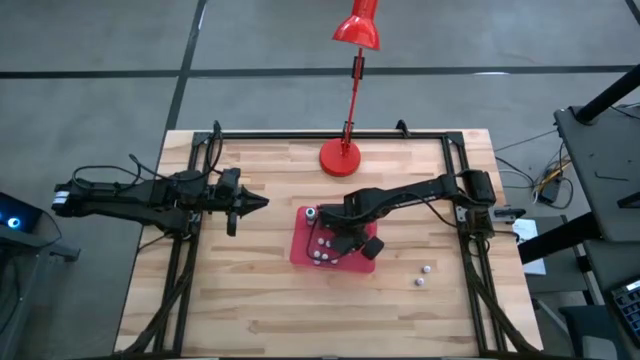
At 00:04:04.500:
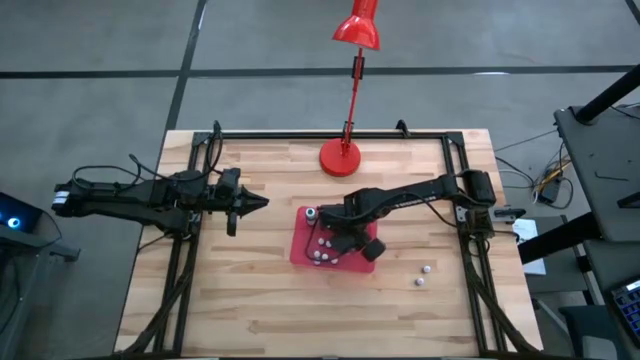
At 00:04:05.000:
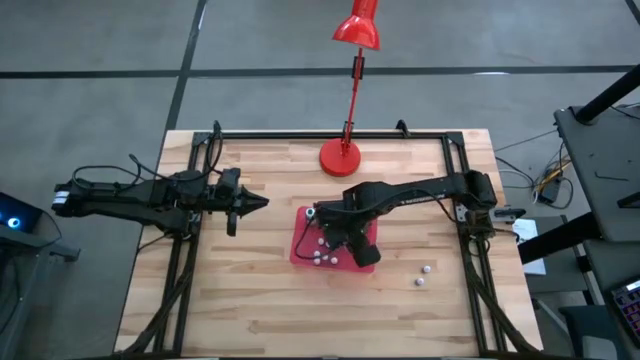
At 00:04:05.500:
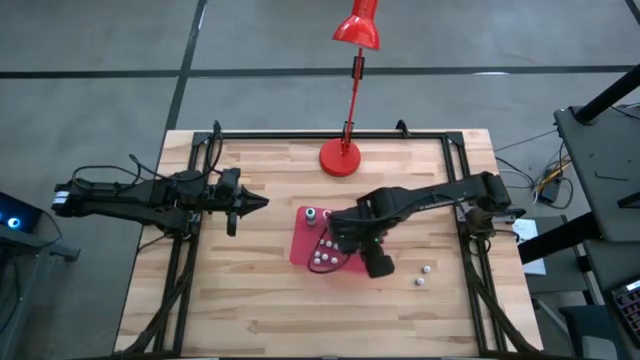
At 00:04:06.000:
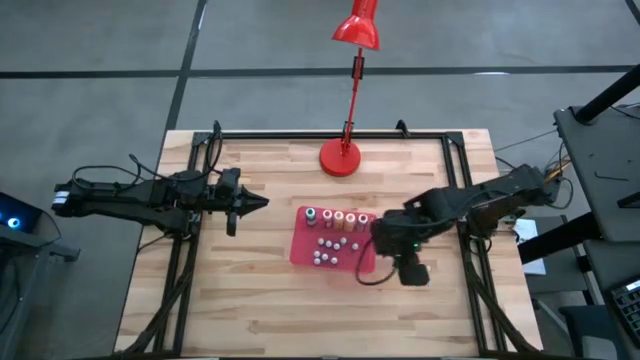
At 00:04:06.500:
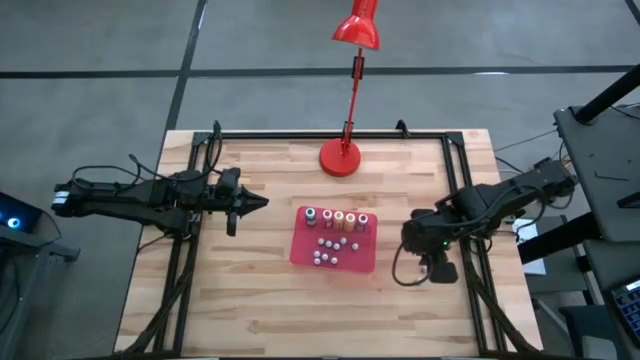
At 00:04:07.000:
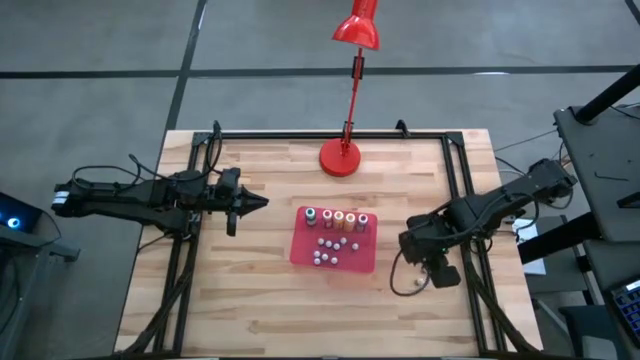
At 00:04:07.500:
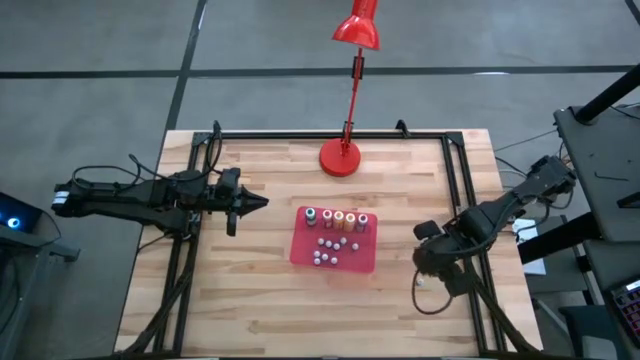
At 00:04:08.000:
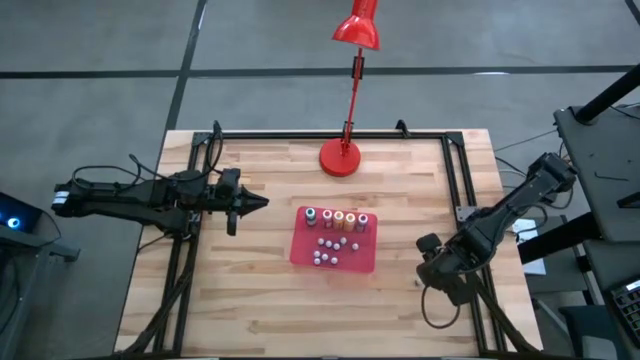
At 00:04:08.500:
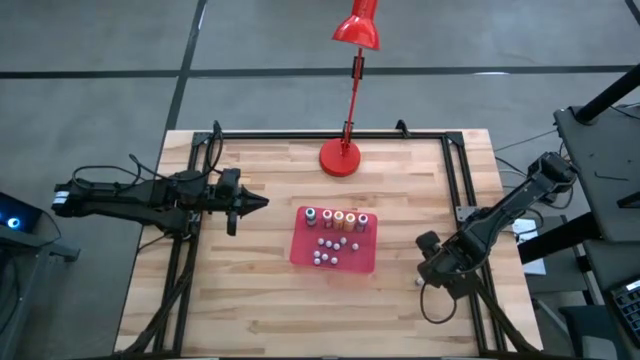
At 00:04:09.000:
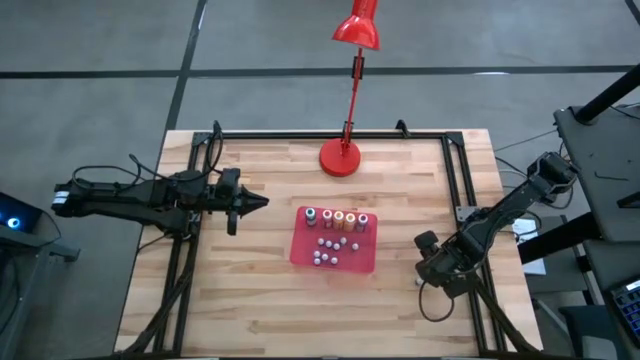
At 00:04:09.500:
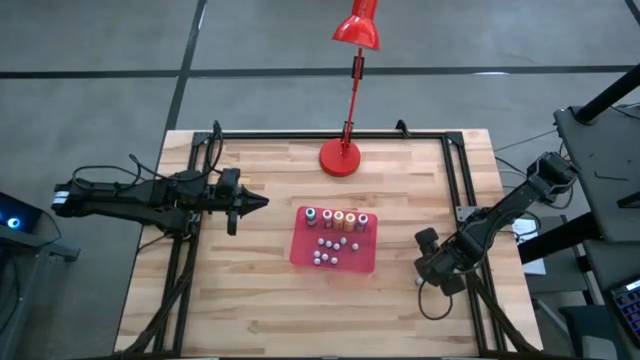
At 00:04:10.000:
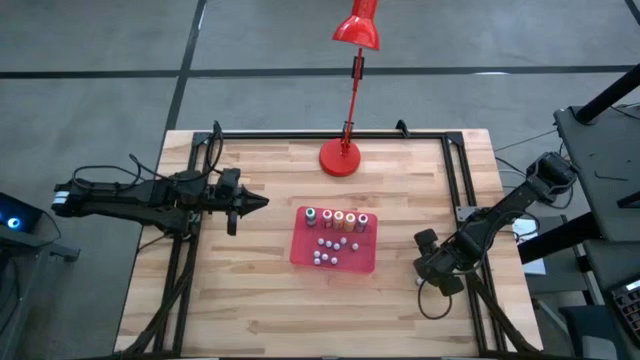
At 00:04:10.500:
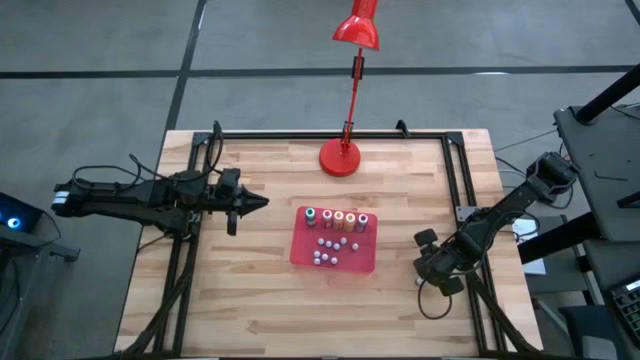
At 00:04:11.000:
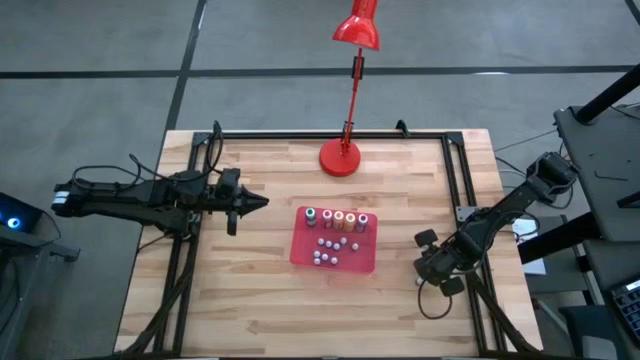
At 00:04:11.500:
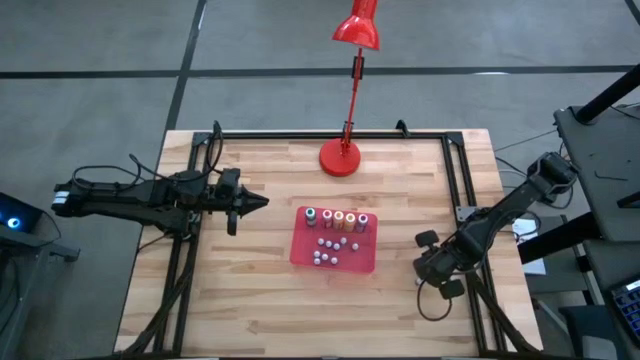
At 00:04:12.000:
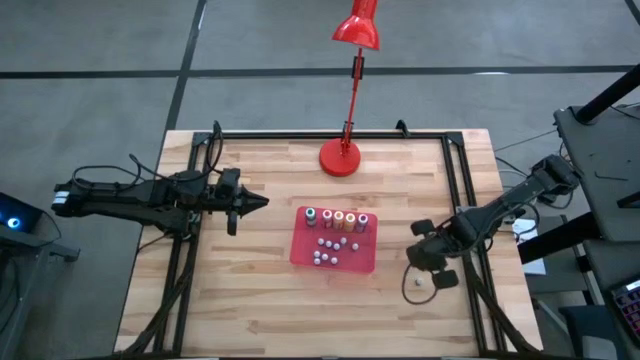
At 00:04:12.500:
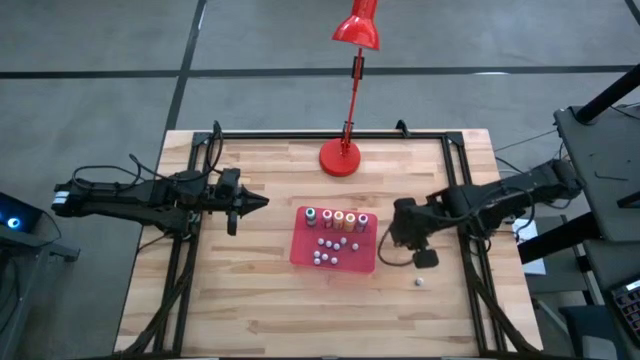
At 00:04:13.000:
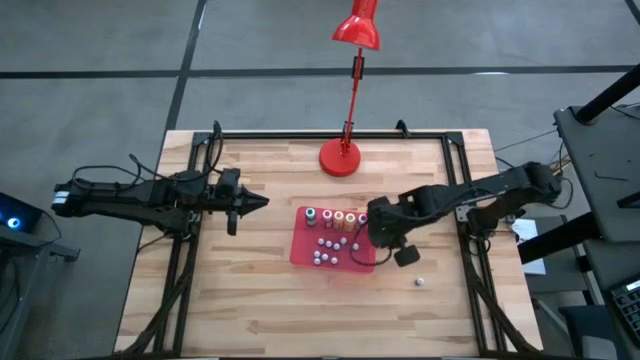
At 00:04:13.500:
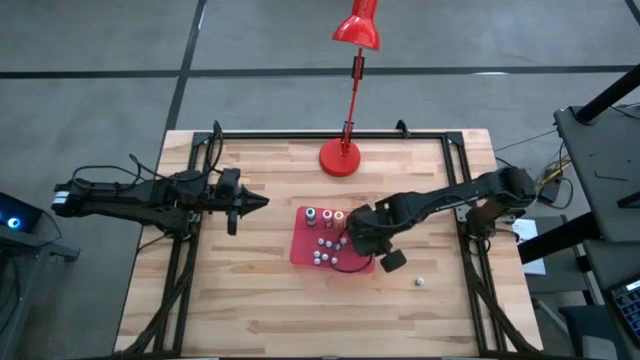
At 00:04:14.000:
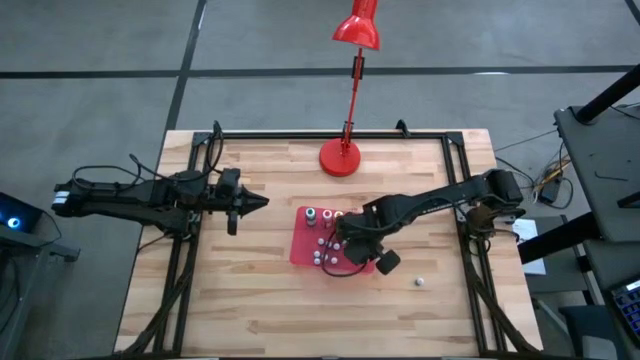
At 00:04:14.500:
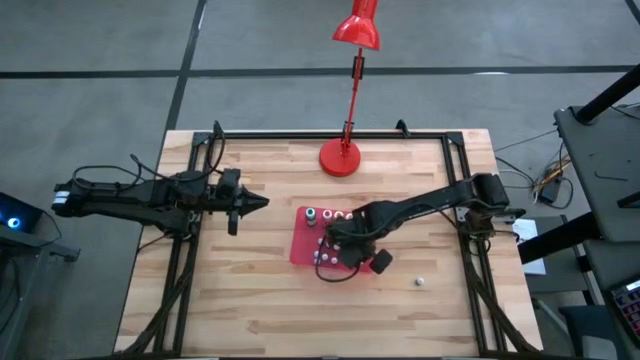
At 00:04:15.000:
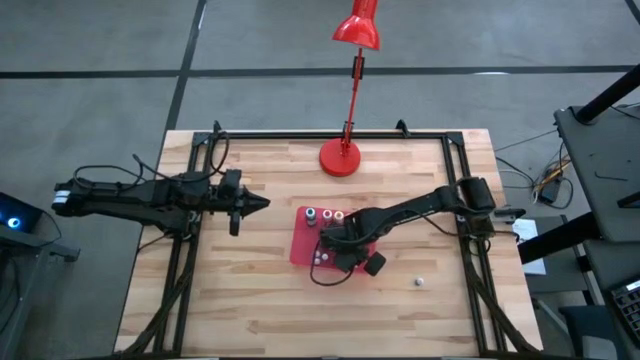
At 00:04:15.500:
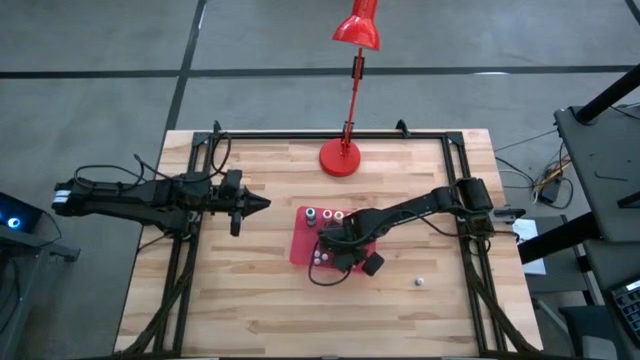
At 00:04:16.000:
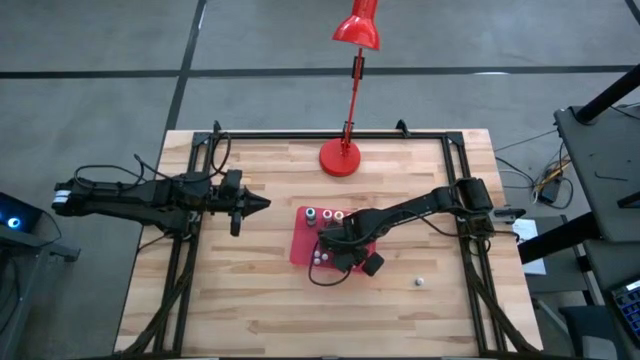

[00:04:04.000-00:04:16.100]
Task: Pick & Place food coloring
Put the small red food coloring bottle into the red bin

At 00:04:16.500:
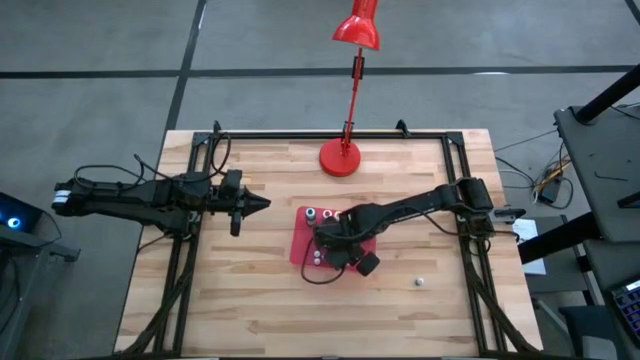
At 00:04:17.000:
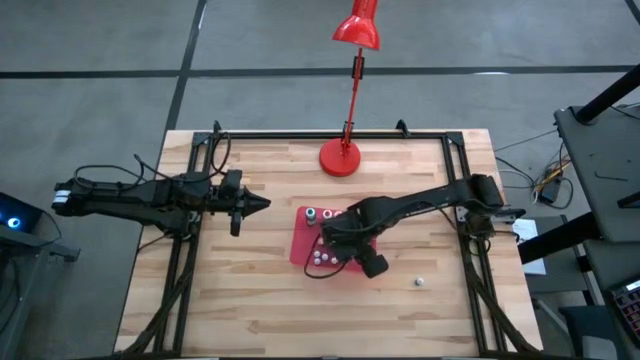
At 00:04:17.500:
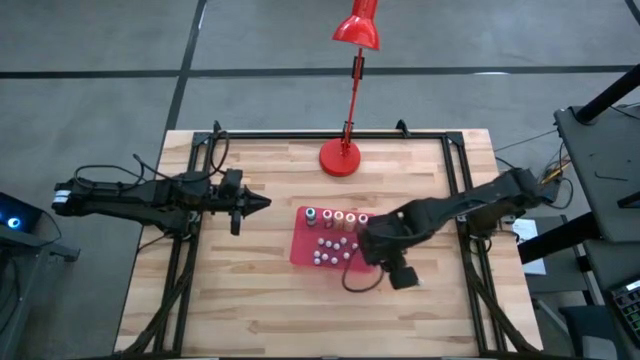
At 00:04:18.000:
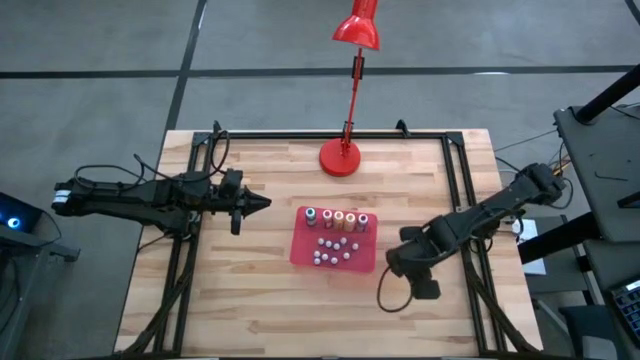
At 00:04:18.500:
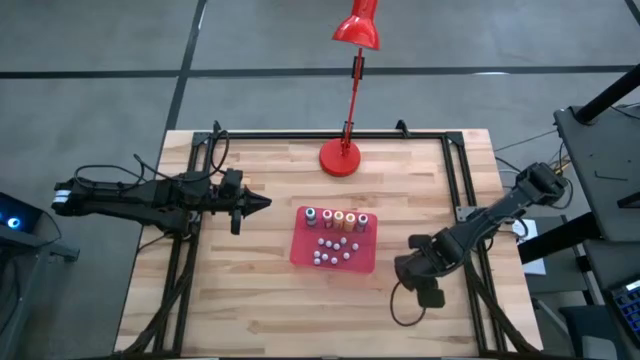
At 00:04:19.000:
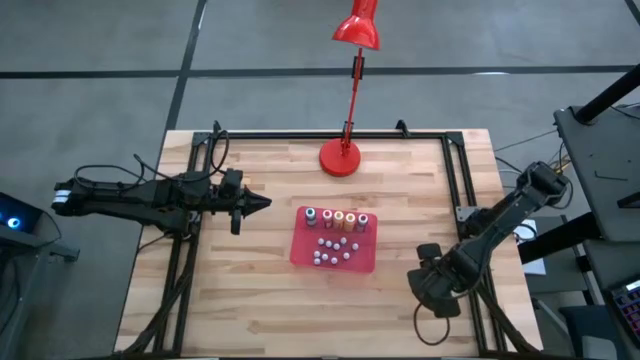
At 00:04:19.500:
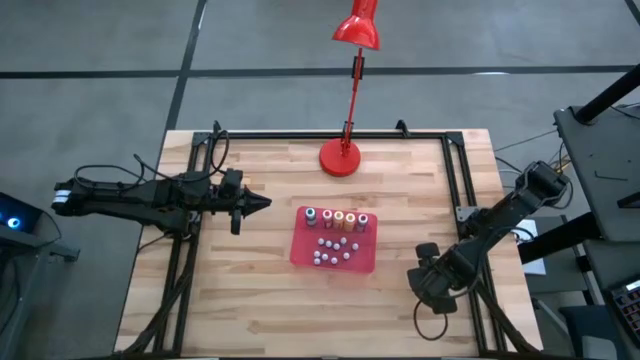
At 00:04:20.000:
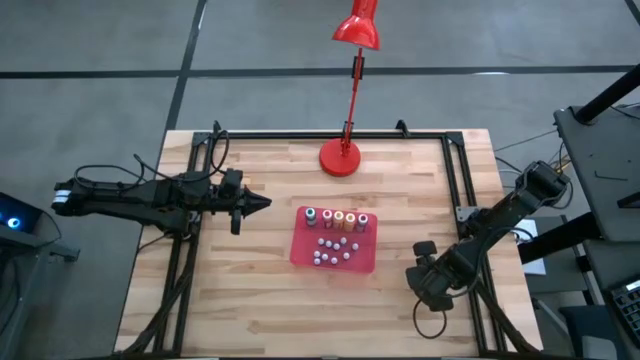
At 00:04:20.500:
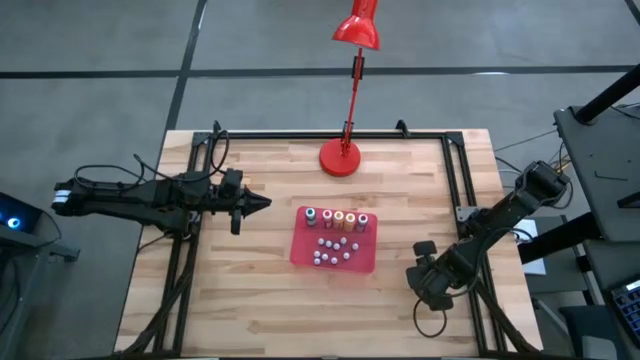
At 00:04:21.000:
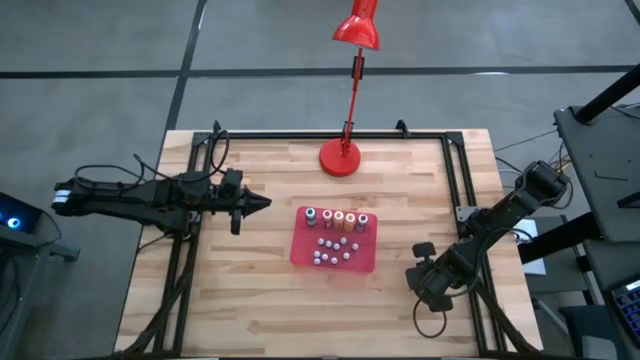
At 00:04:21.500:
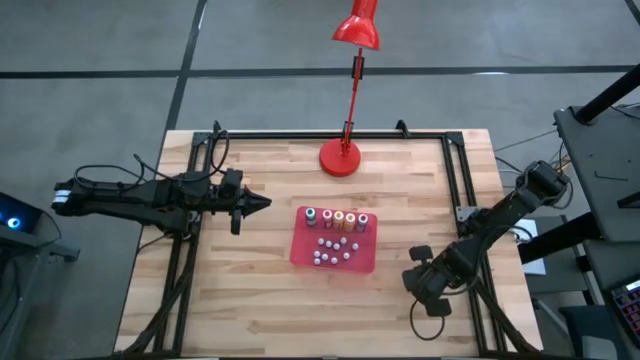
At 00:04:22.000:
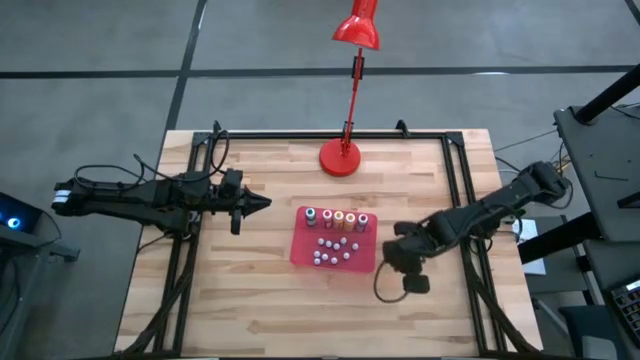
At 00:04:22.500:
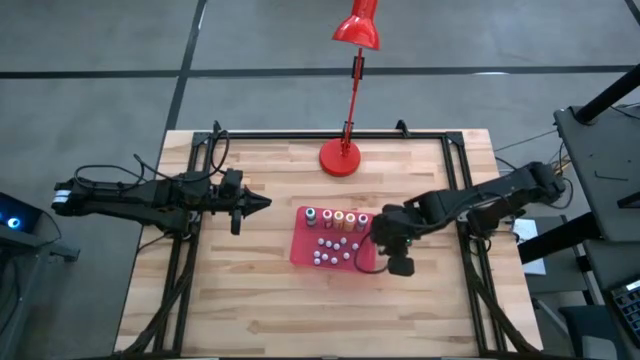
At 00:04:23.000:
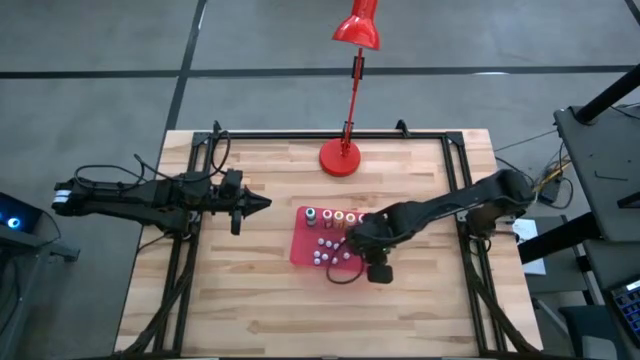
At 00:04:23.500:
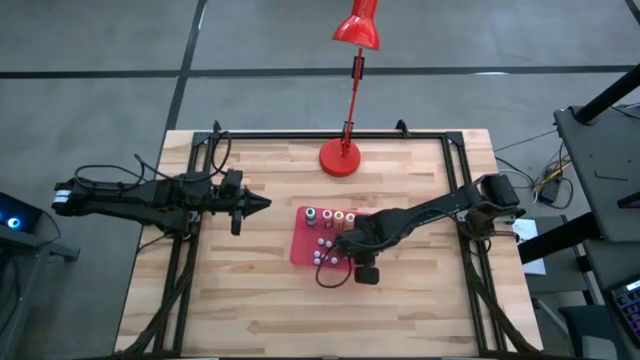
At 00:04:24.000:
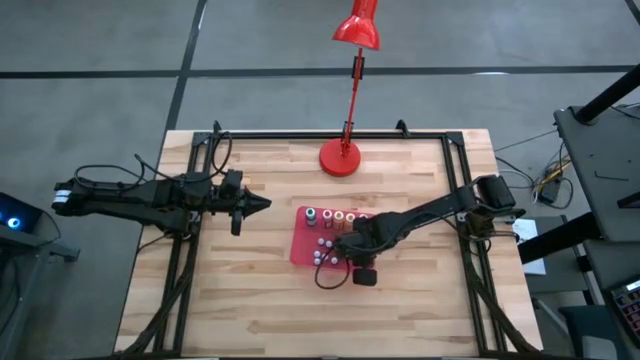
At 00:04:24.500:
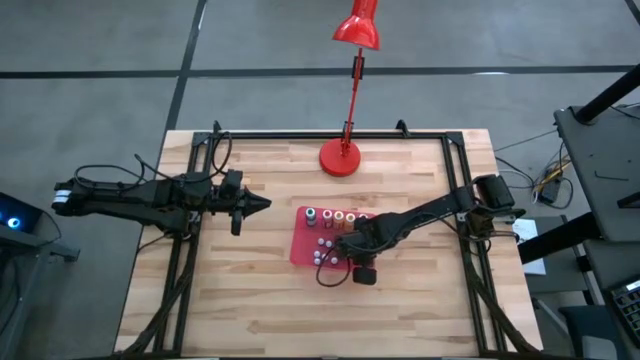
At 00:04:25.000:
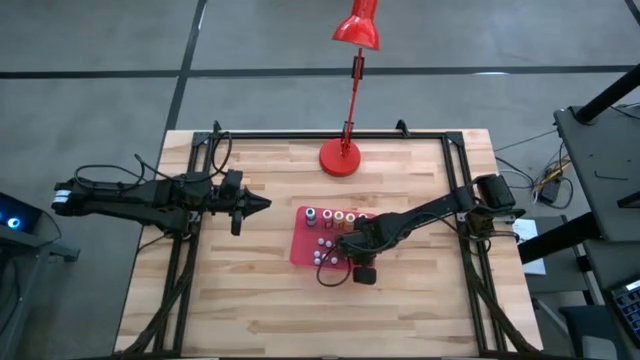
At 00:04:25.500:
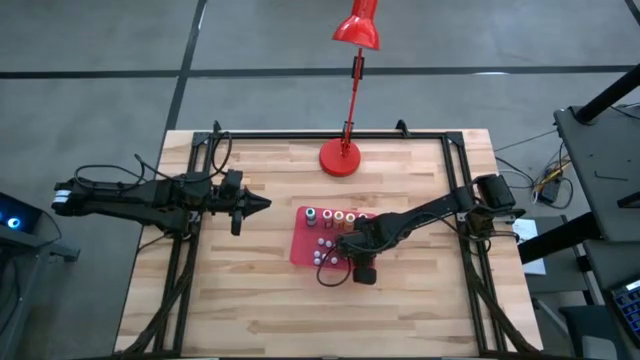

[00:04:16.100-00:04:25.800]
Put the small green food coloring bottle into the red bin
